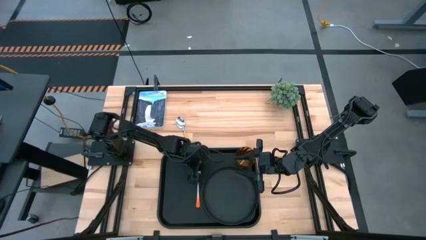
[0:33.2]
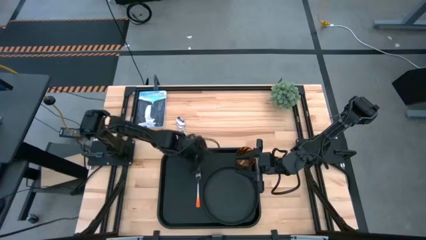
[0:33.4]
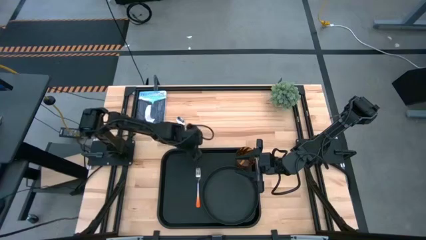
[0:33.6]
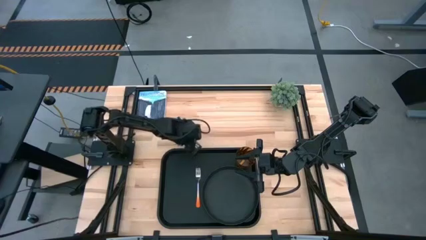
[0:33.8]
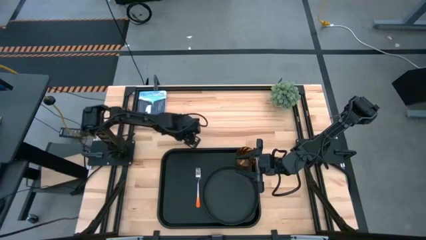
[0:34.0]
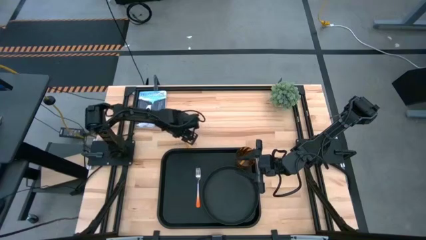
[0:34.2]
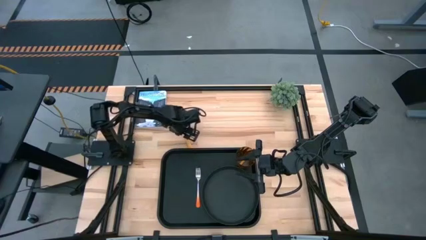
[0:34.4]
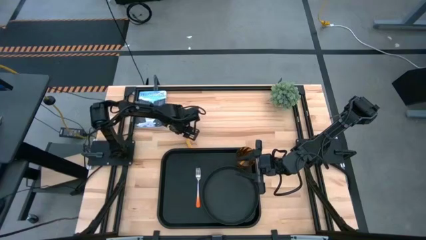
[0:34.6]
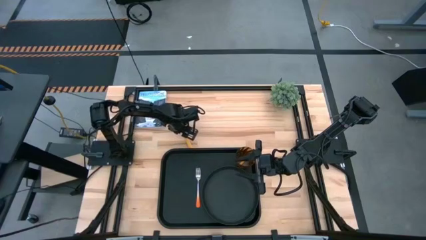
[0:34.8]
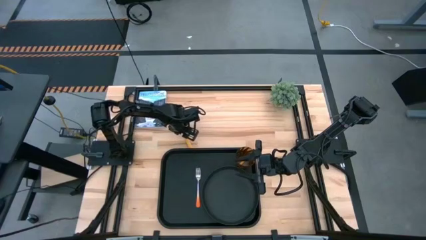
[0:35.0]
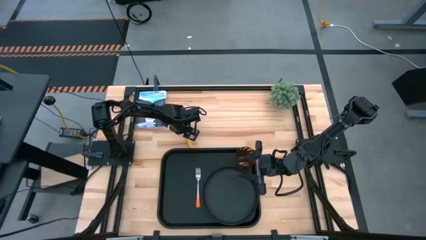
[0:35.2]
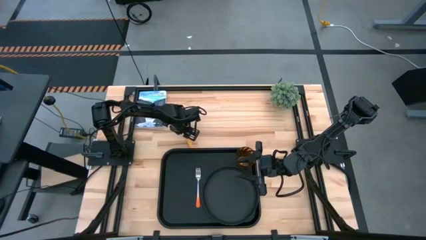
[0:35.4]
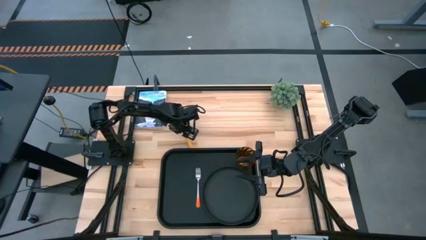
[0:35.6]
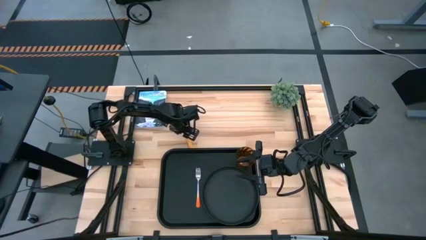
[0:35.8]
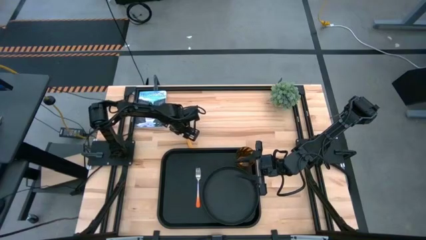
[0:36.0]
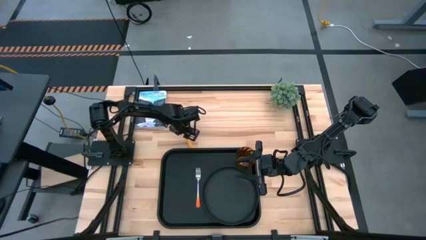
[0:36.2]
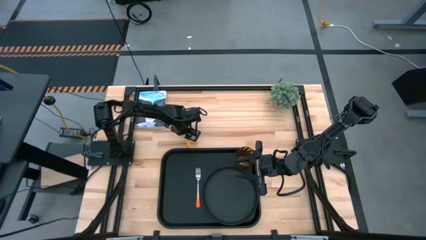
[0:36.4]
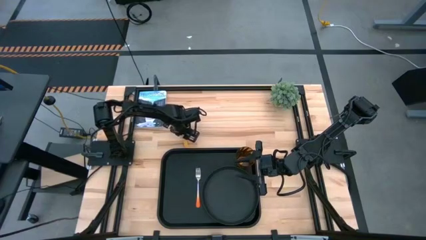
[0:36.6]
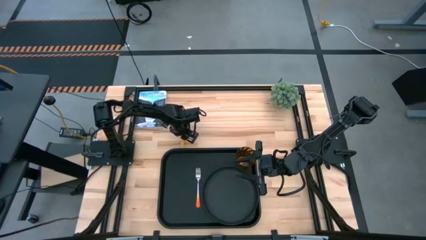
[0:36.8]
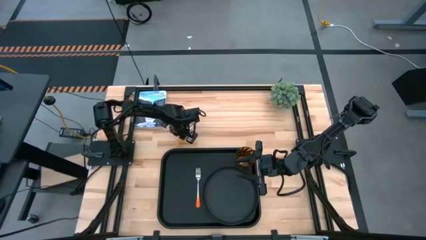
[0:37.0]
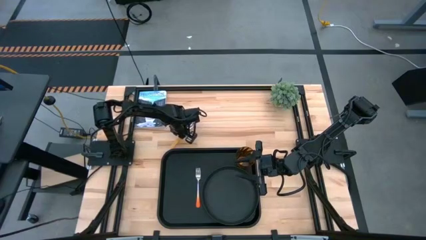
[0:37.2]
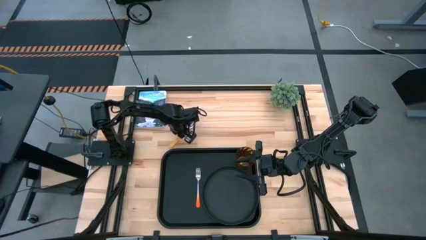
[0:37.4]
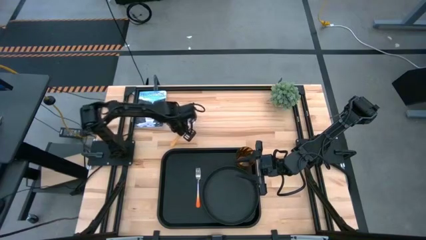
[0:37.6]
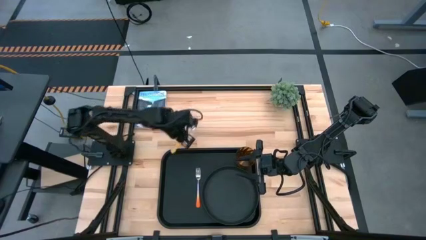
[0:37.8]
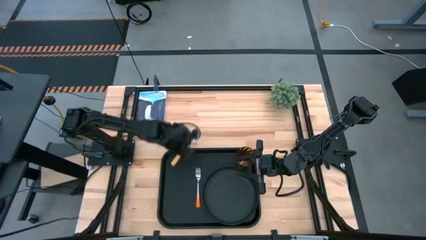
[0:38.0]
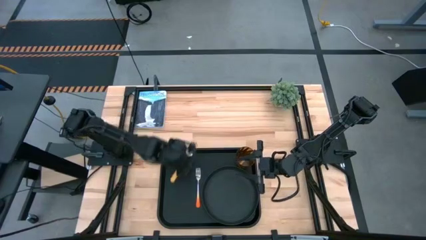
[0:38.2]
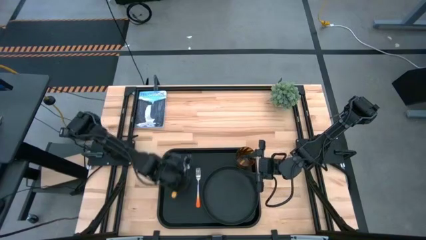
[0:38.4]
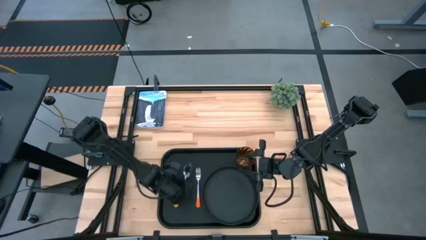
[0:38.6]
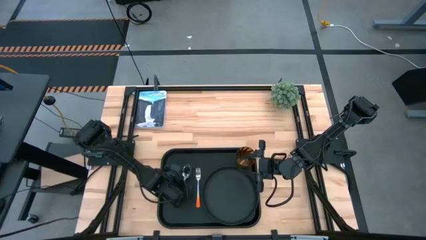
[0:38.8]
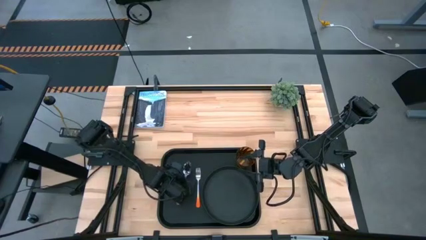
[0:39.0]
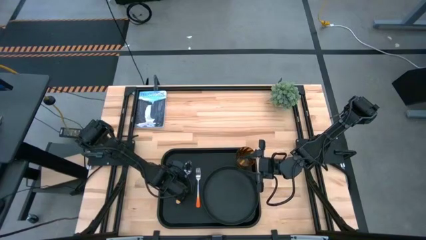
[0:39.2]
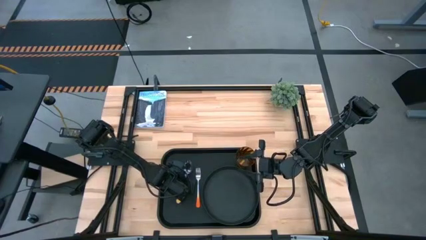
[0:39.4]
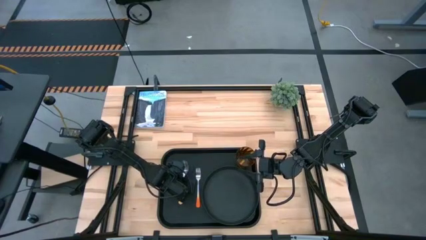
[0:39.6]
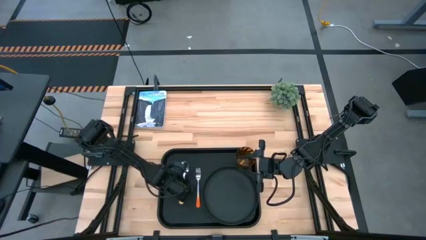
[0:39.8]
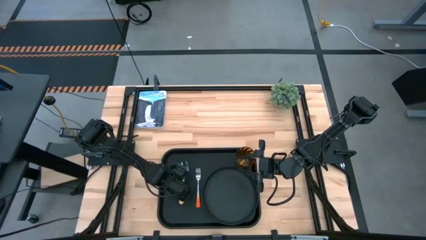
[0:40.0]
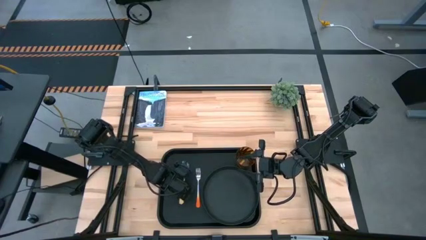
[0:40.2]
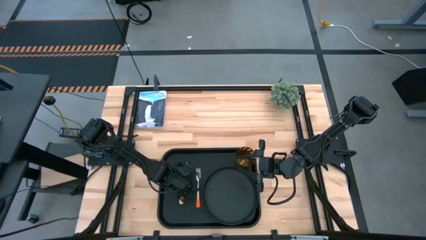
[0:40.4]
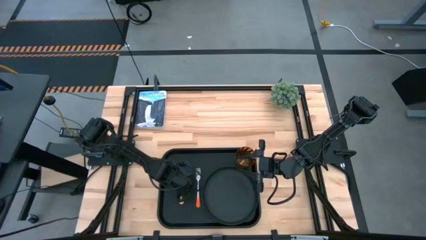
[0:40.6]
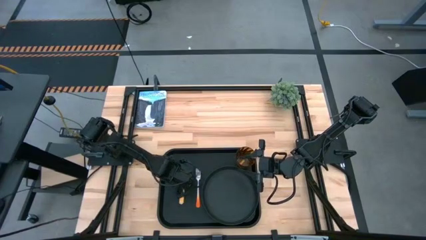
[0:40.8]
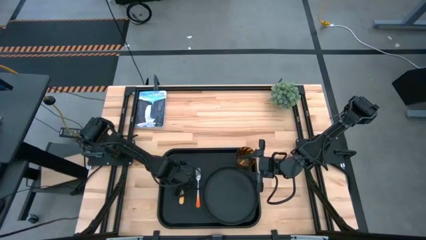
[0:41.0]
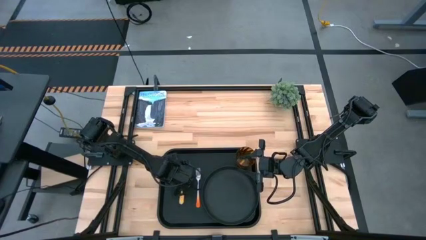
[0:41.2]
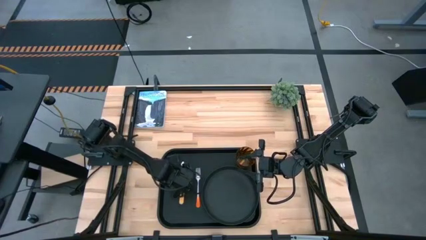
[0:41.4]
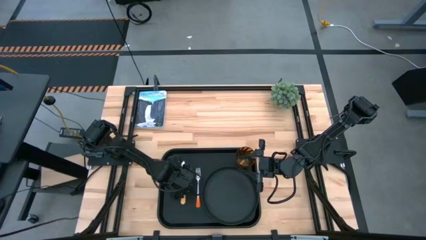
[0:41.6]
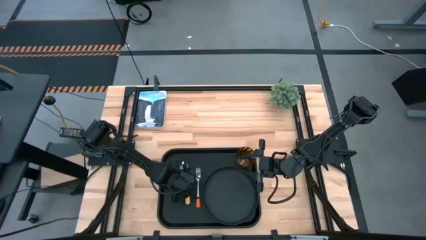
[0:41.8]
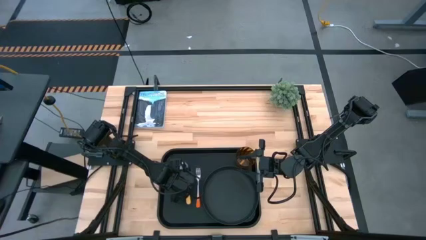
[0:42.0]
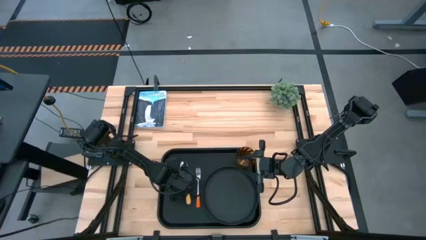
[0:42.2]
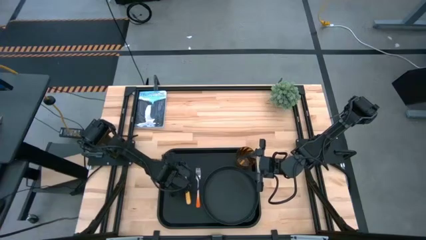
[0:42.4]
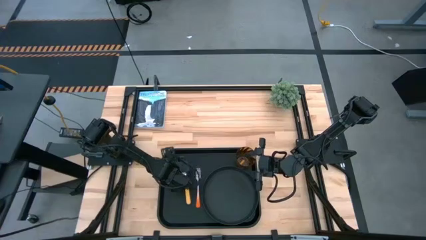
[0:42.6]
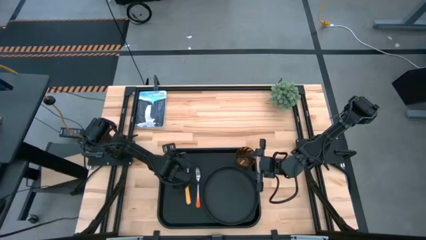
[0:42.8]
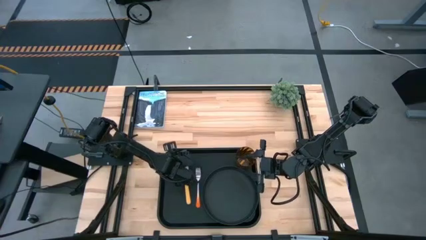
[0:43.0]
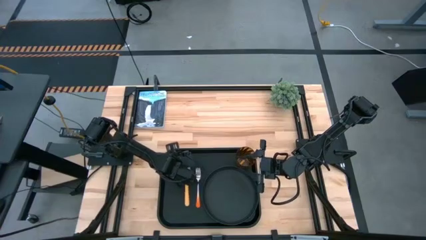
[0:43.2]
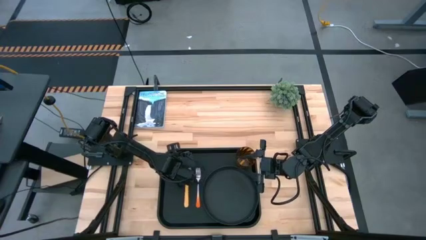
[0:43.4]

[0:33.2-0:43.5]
Task: Pick and place plate/cup/fork/spoon on tray
Put the orange spoon on the black serving tray beside the orange fork

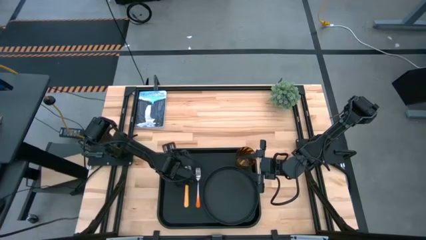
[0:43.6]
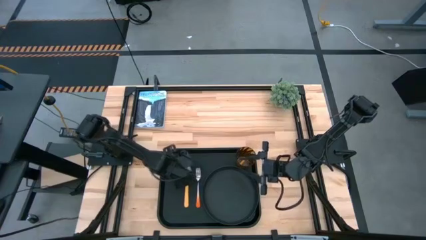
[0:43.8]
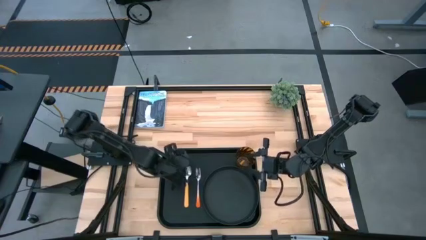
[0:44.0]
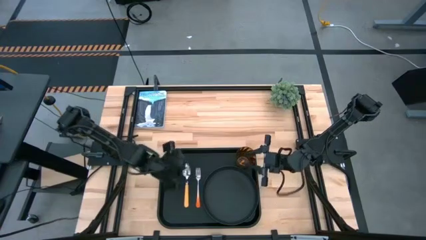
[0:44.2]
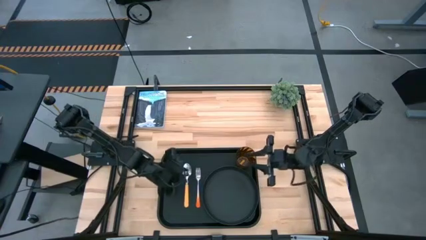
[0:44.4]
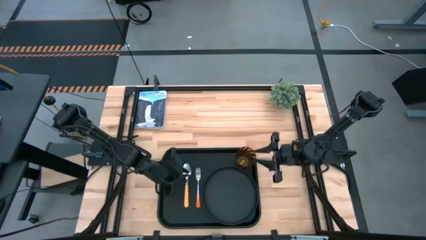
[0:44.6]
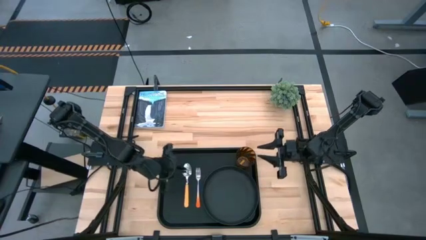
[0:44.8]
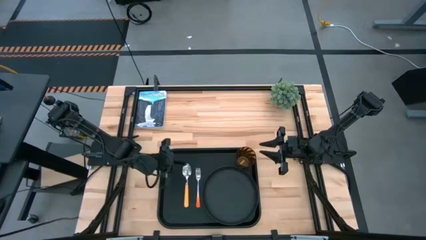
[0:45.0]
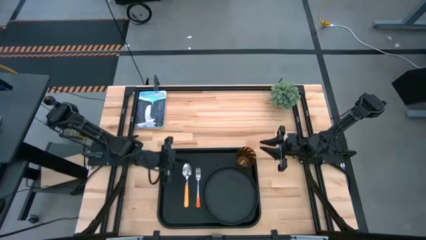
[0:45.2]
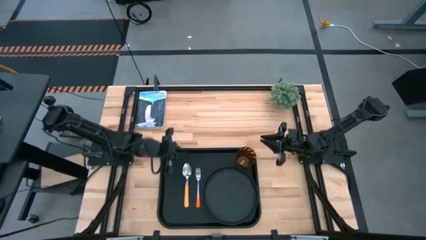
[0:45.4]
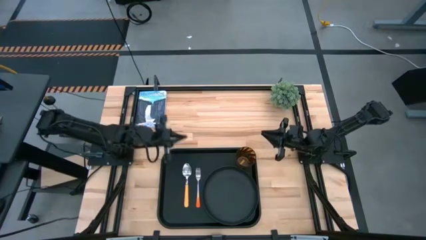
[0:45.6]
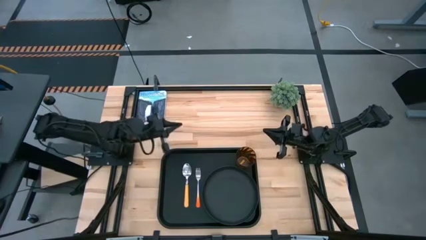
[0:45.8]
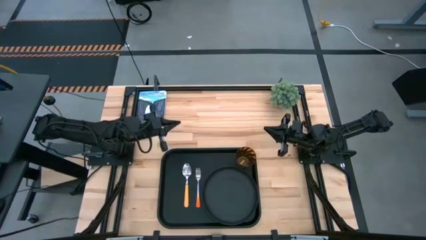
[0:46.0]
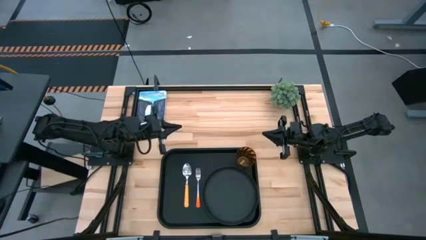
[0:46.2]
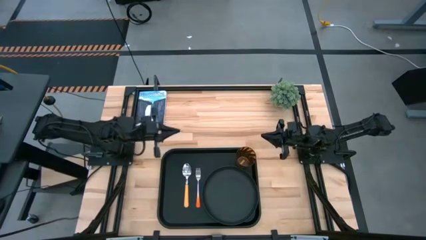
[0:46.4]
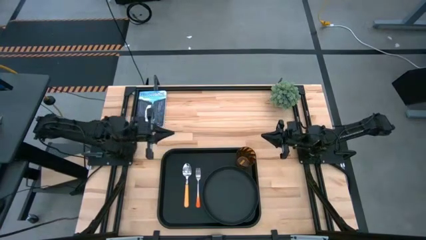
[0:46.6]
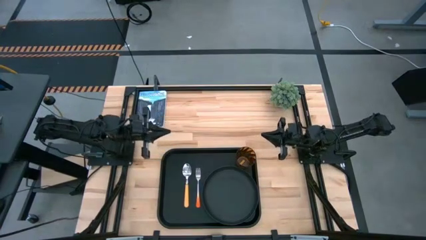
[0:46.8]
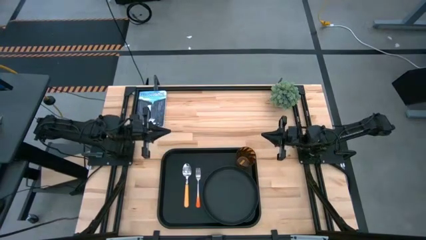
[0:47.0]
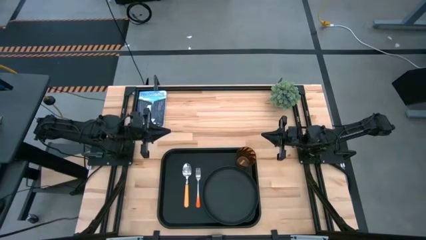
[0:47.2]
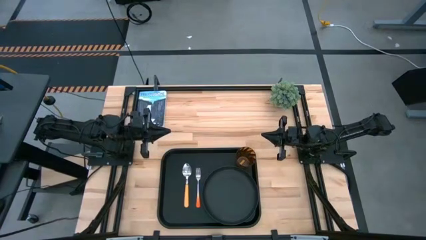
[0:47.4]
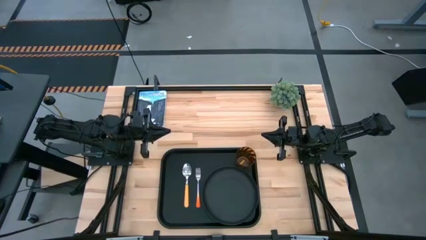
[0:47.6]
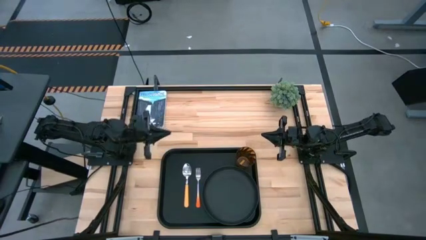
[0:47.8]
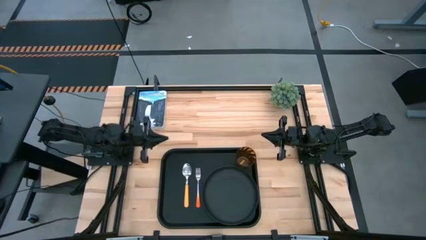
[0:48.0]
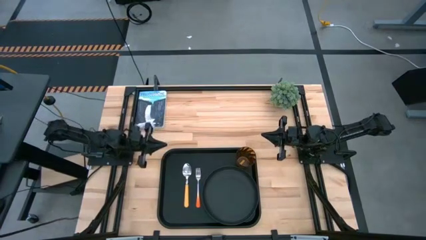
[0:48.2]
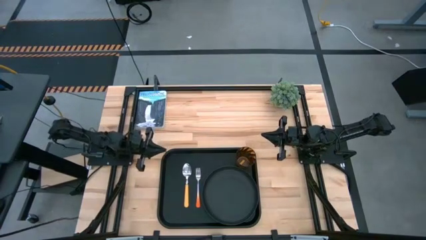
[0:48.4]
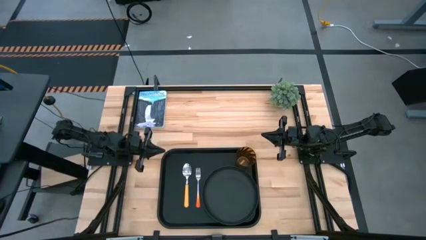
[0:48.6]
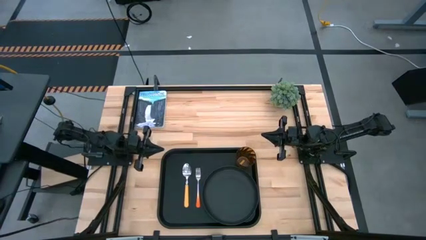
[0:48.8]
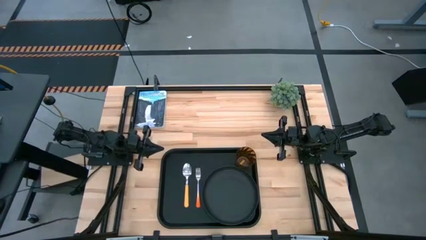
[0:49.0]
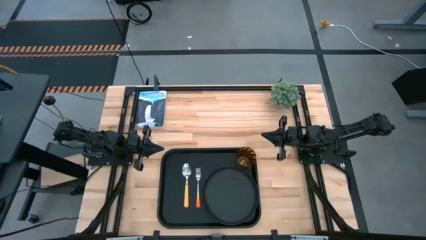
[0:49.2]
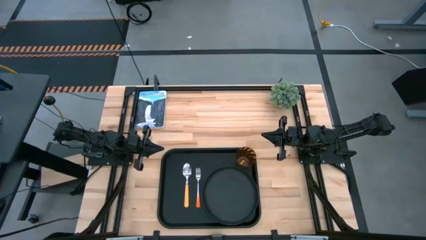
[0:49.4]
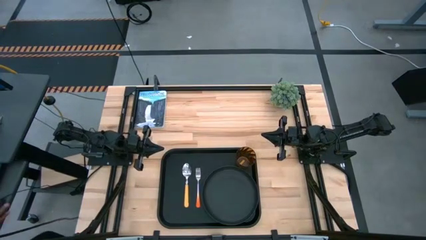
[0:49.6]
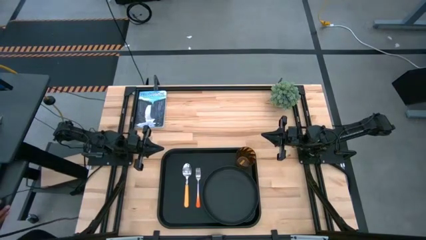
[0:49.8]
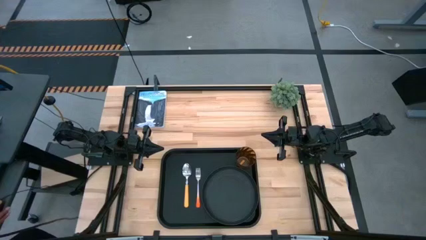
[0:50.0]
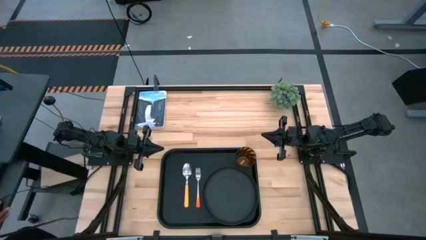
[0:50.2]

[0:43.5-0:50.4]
Return to Home Position
